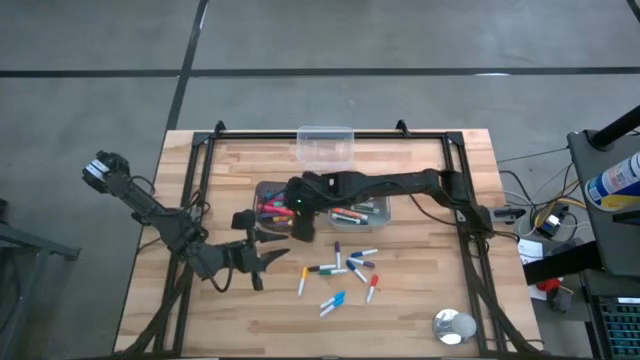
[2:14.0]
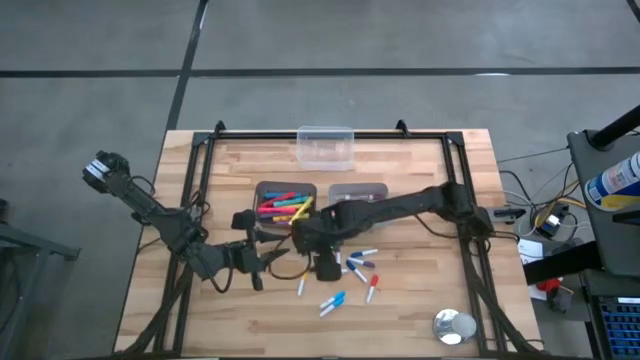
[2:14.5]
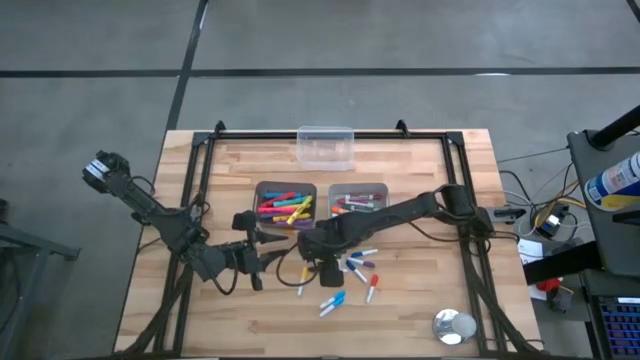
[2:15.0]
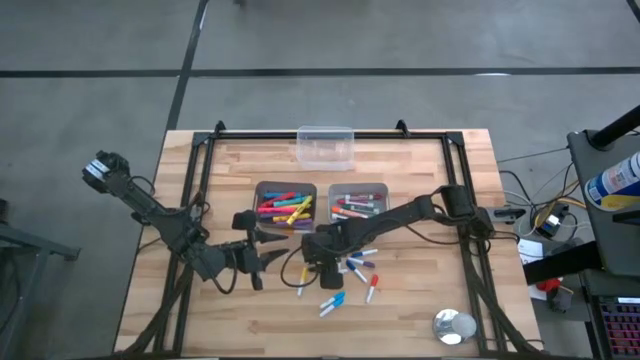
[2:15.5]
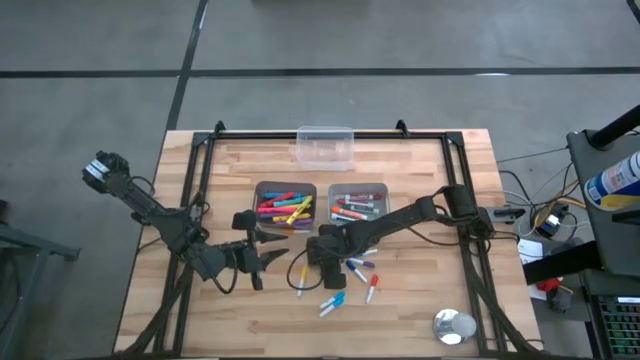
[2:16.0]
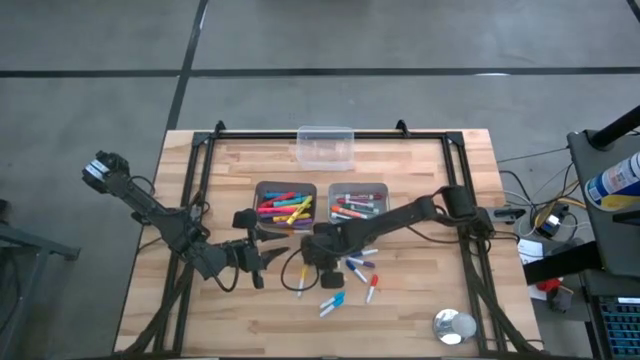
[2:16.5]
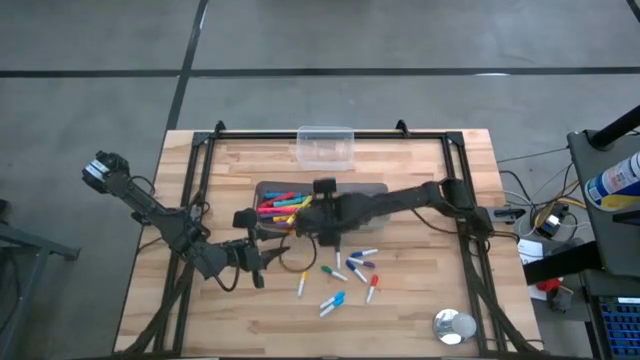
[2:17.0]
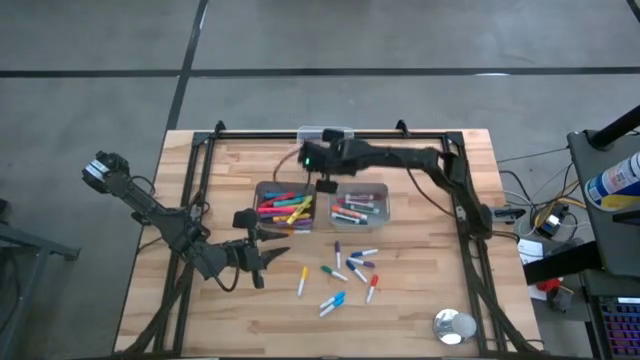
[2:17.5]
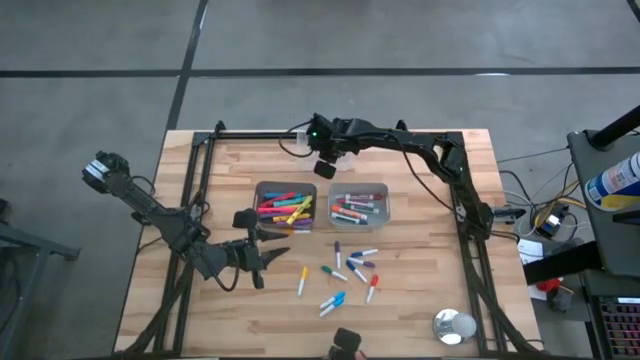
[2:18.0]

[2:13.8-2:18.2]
Task: Pick & Place Markers
Put the small black highlighter pen into the transparent bin

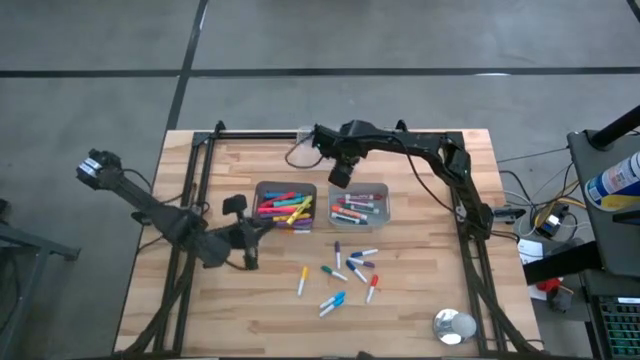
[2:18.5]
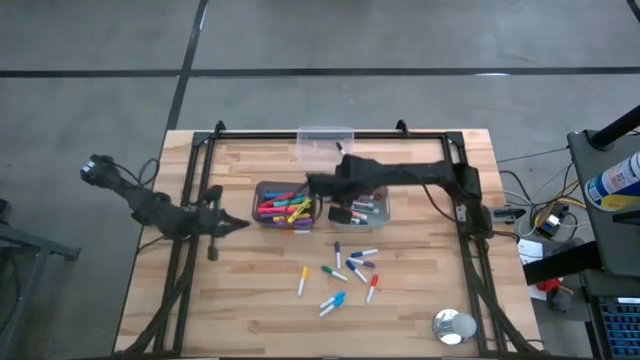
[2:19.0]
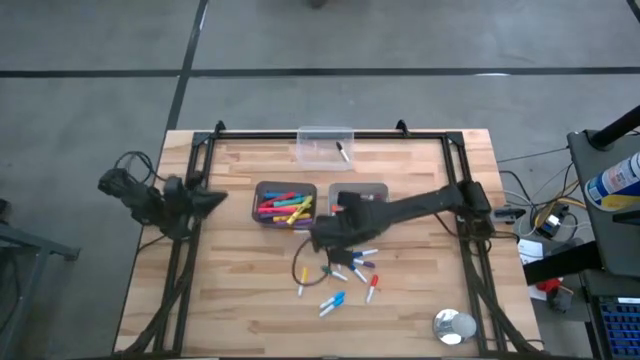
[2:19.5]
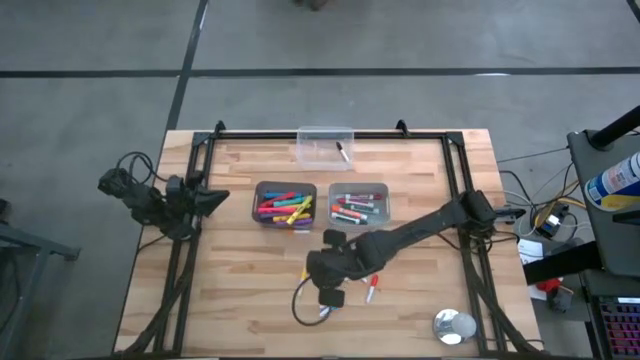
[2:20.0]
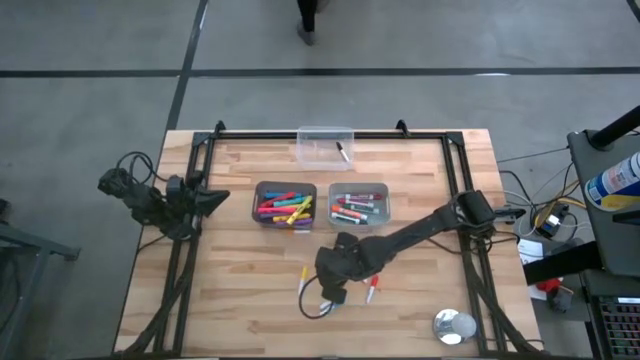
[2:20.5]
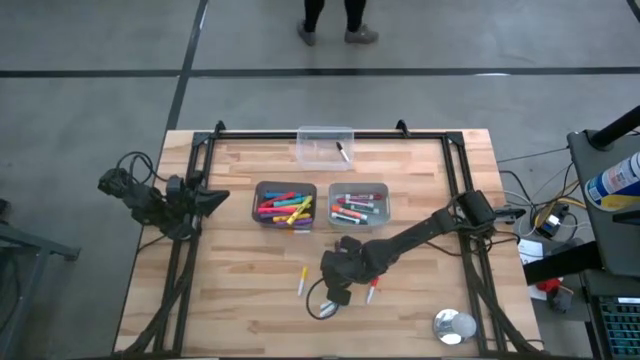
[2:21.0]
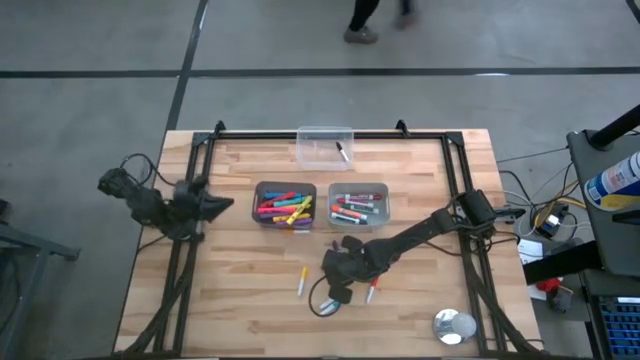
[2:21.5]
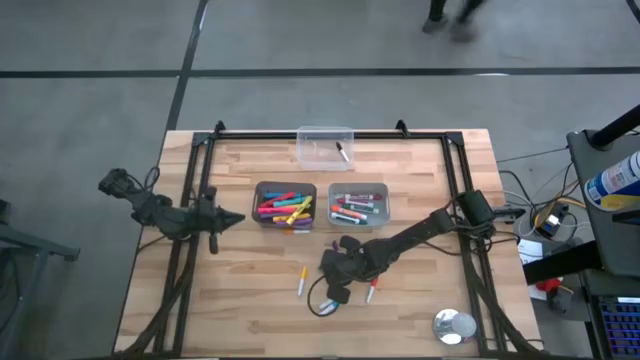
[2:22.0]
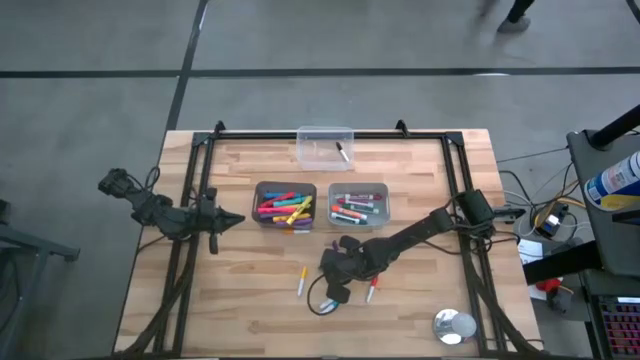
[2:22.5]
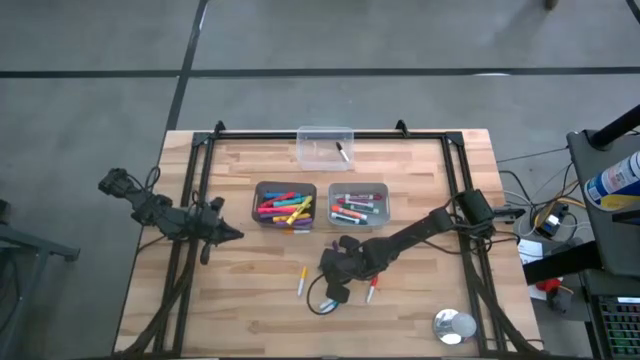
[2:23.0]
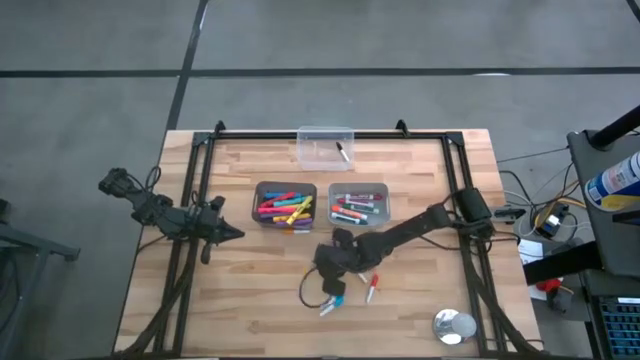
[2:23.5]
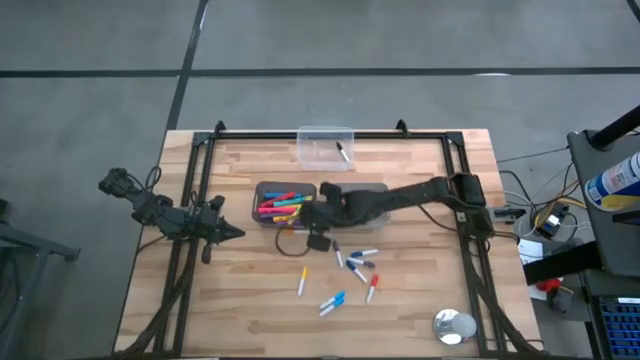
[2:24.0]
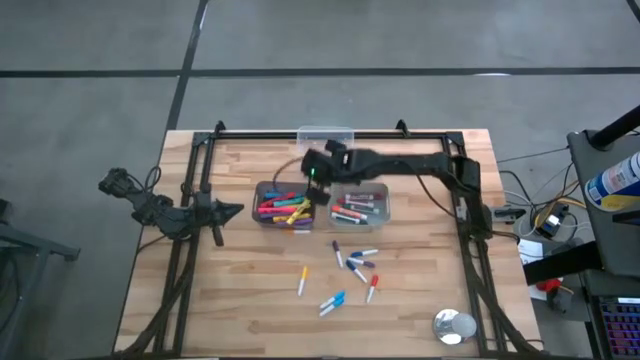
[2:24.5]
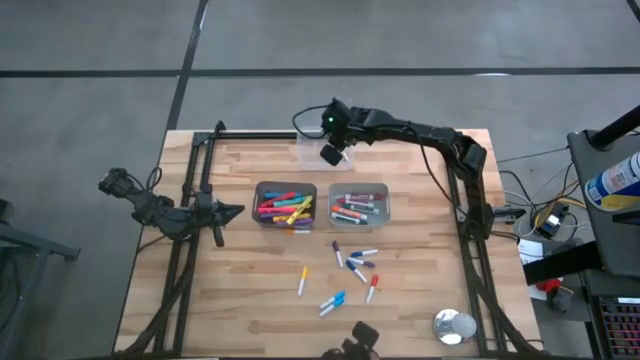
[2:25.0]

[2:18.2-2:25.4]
Put the small green highlighter pen into the transparent bin

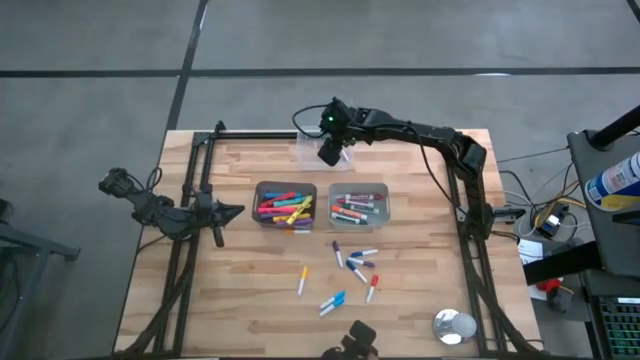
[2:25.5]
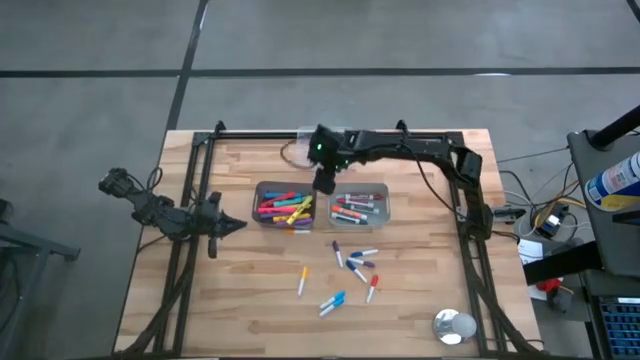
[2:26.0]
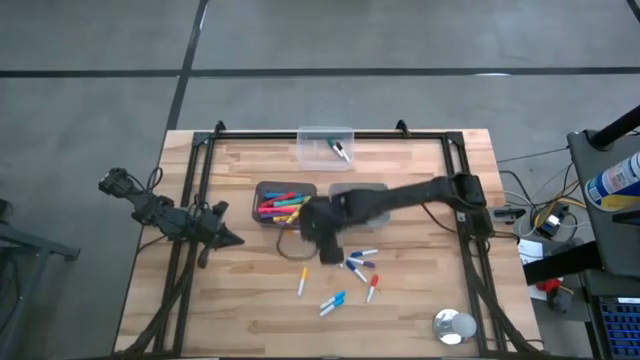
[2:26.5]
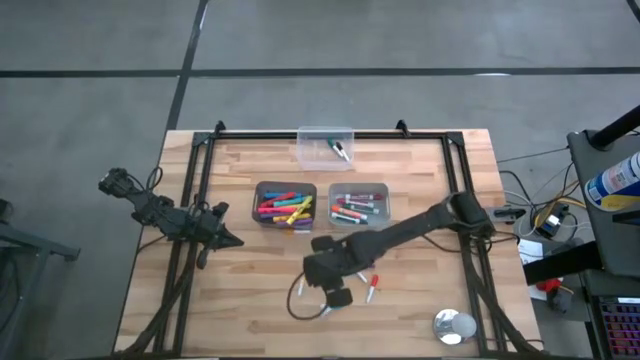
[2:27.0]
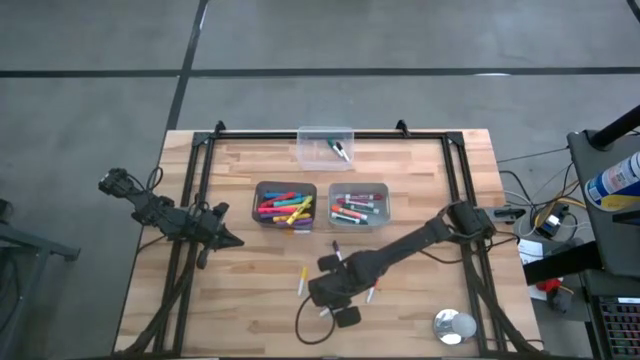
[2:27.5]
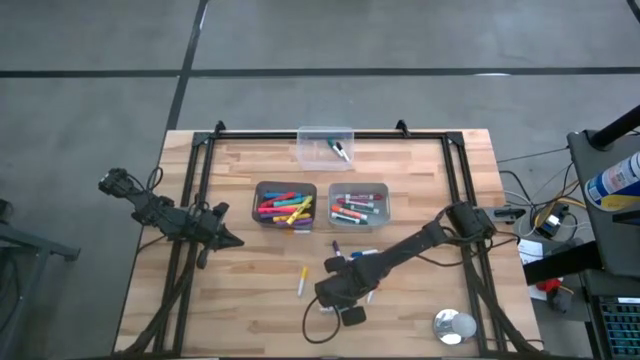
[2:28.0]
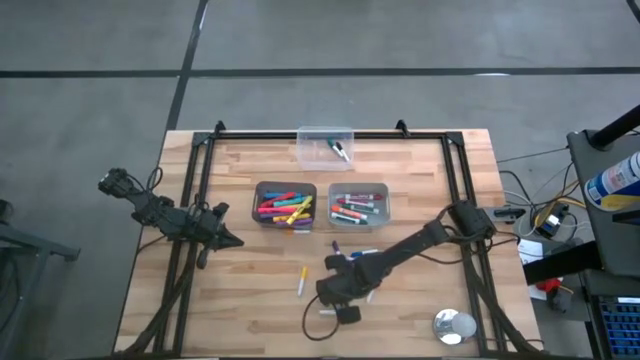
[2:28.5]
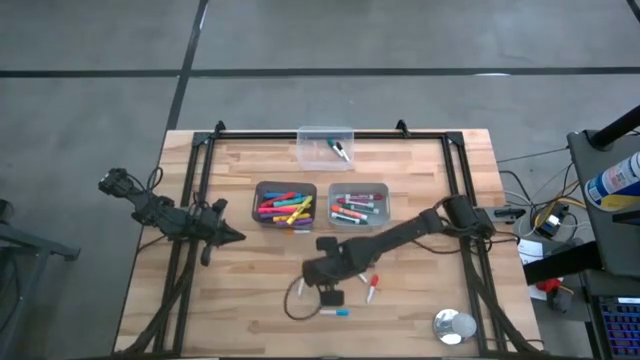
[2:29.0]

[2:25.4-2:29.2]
Put the small yellow highlighter pen into the transparent bin

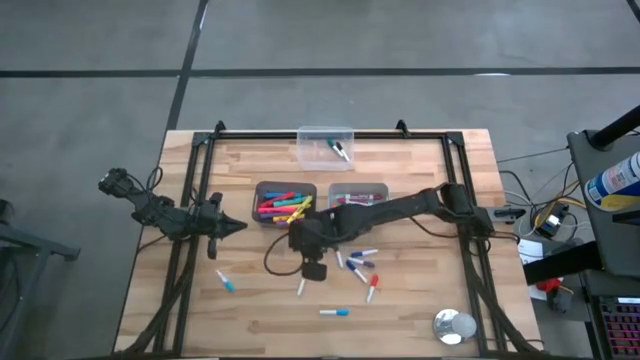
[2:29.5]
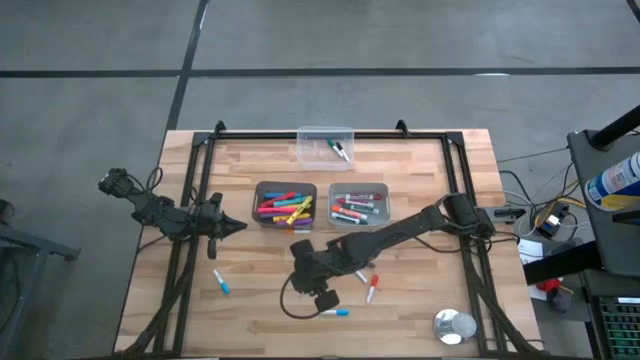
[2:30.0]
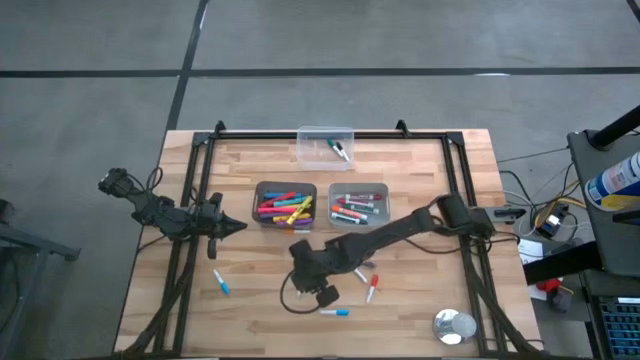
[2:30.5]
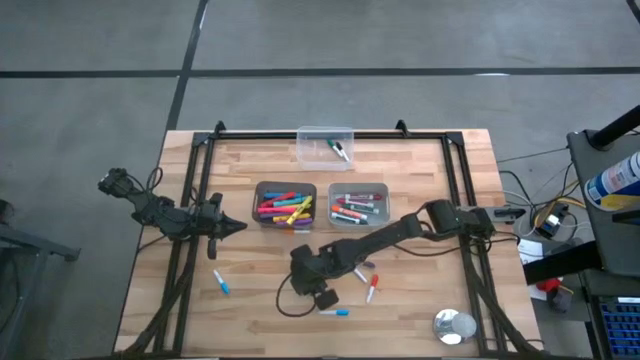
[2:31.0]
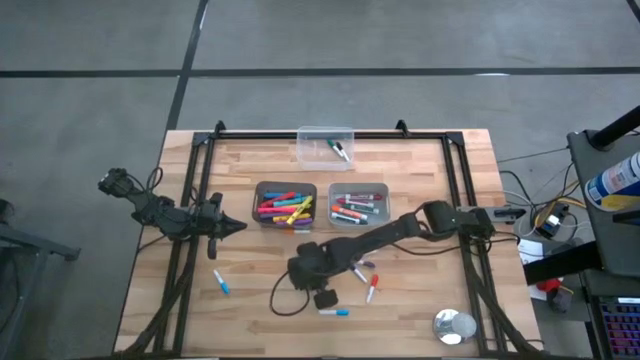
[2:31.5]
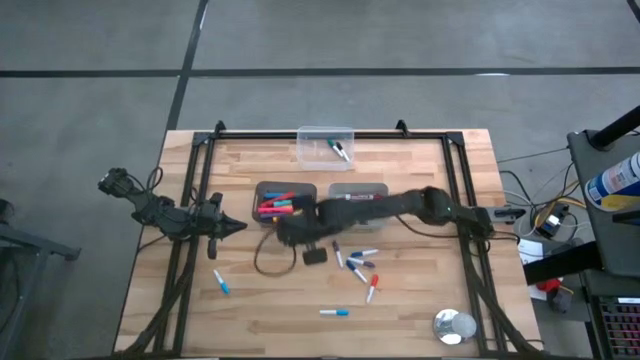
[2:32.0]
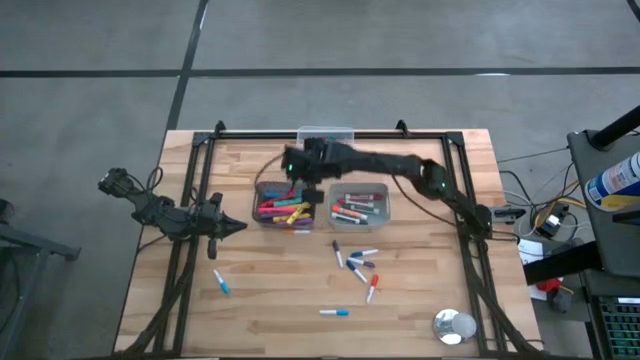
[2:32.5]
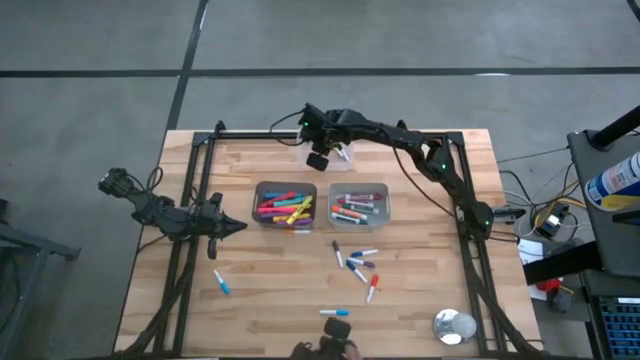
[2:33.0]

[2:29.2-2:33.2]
Put the small yellow highlighter pen into the transparent bin
